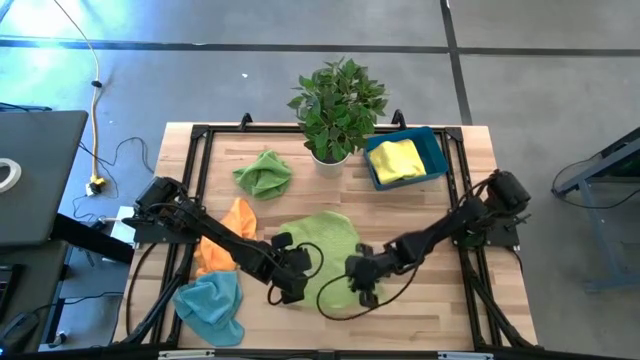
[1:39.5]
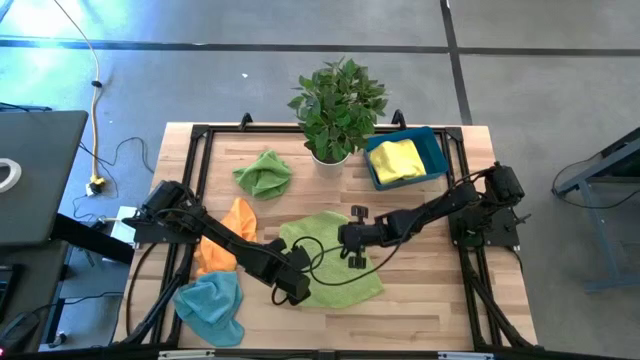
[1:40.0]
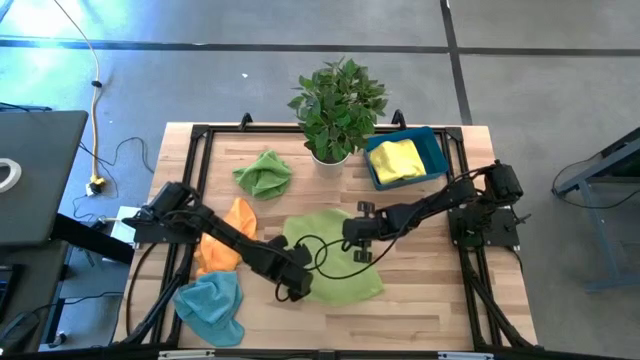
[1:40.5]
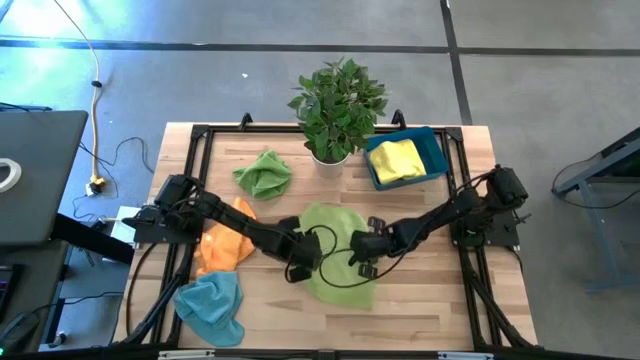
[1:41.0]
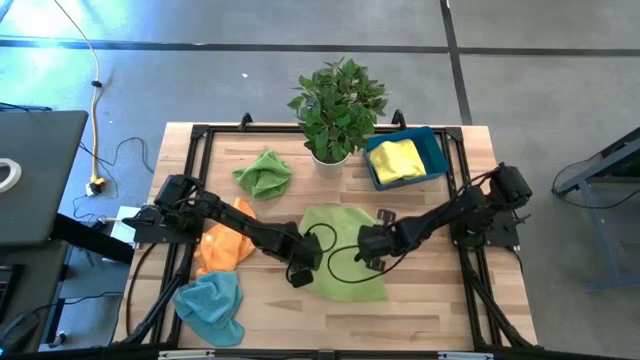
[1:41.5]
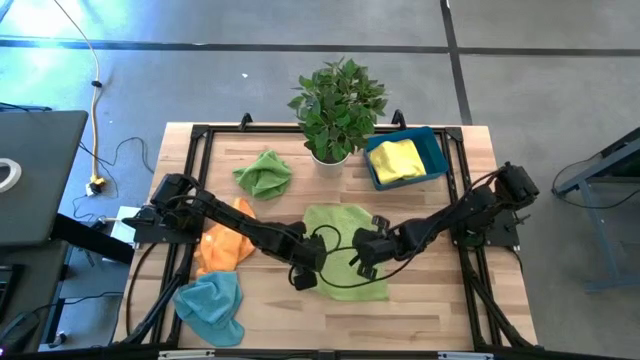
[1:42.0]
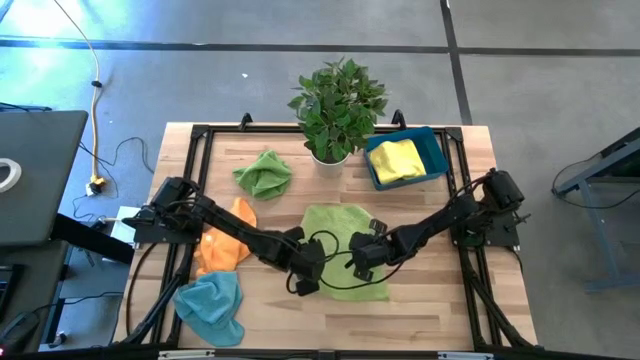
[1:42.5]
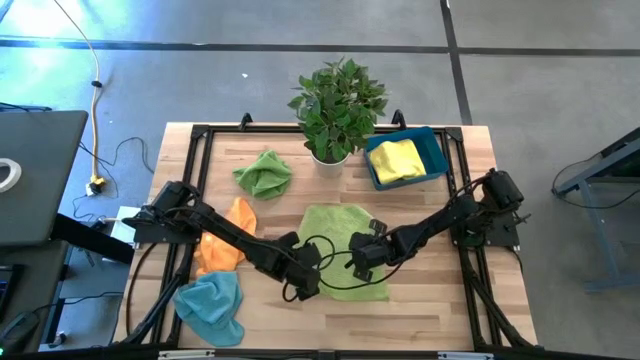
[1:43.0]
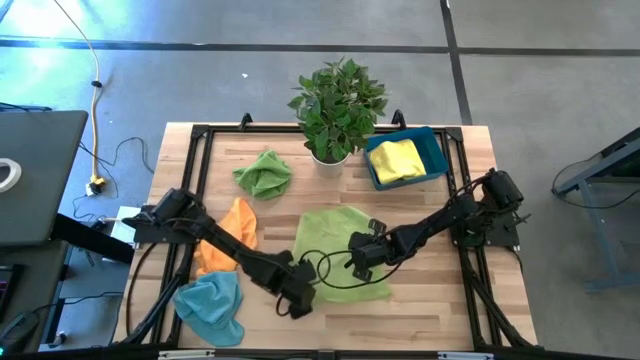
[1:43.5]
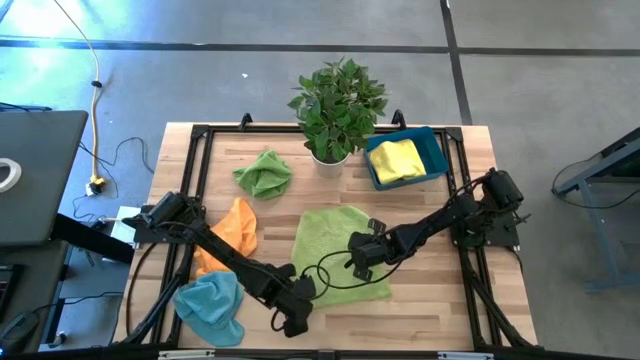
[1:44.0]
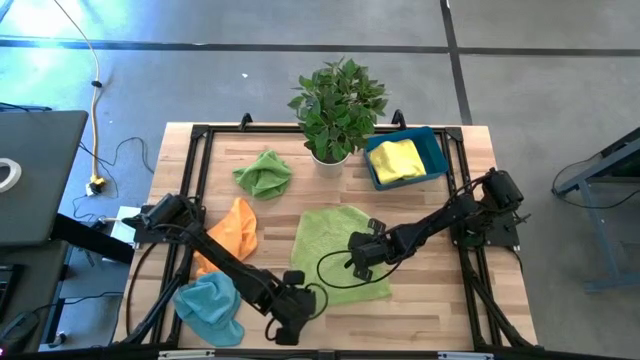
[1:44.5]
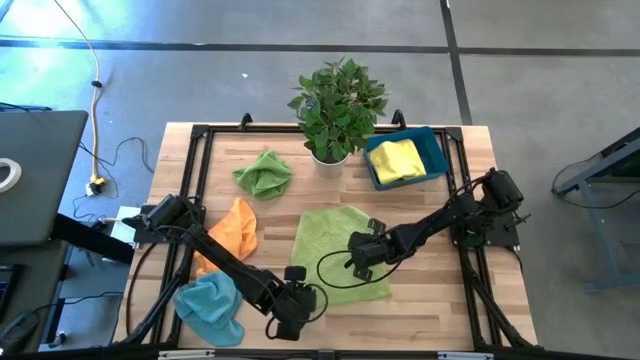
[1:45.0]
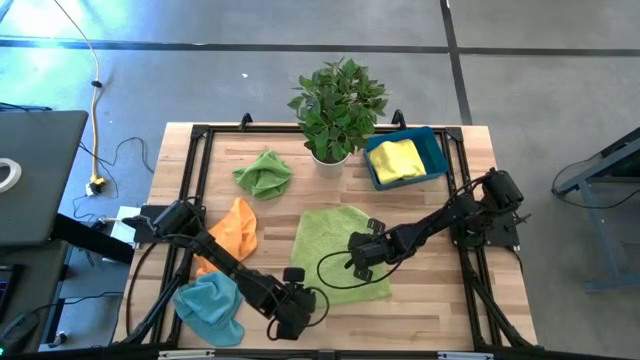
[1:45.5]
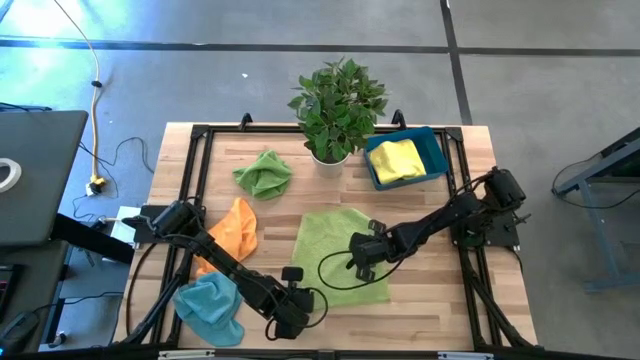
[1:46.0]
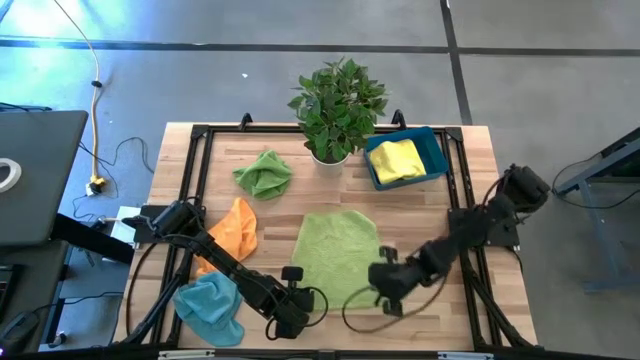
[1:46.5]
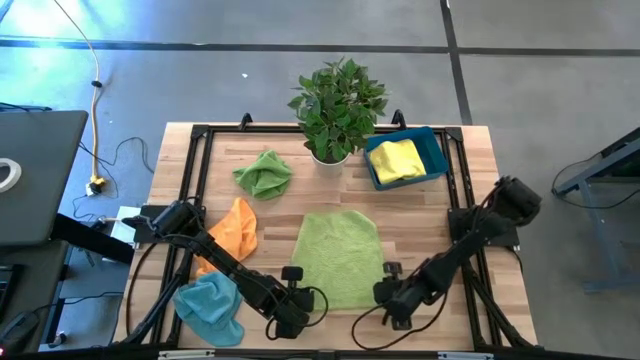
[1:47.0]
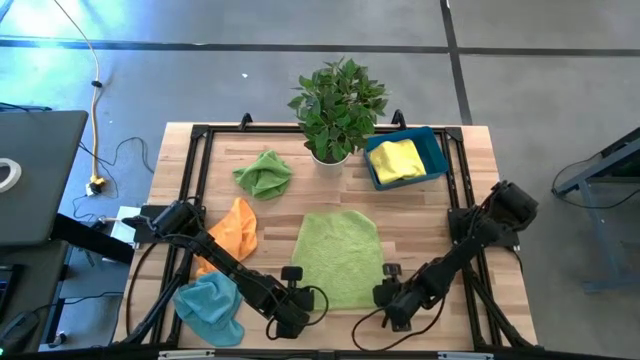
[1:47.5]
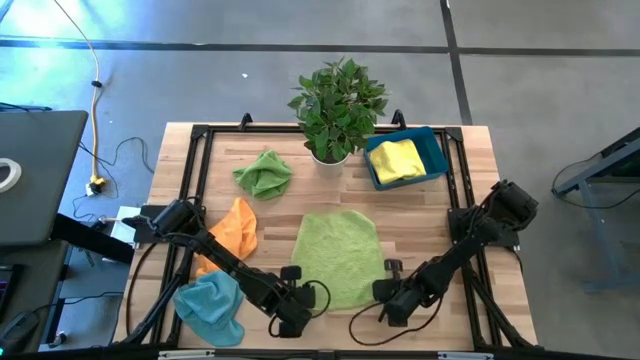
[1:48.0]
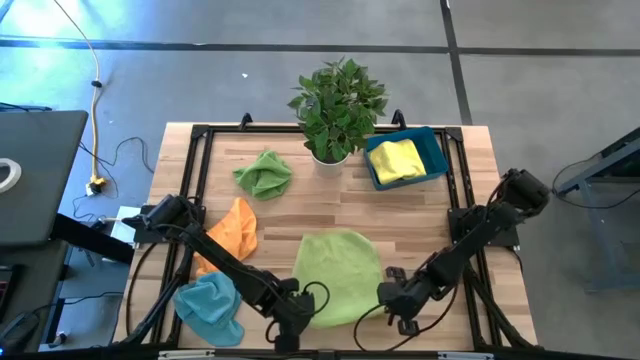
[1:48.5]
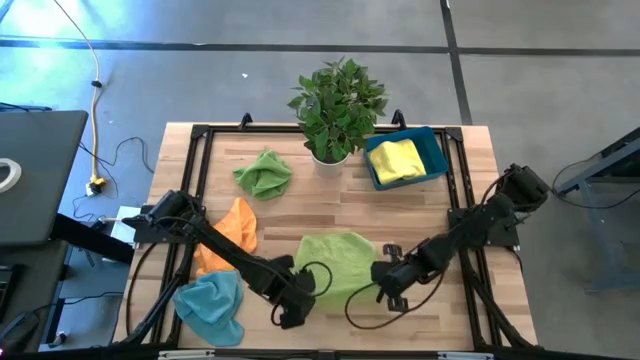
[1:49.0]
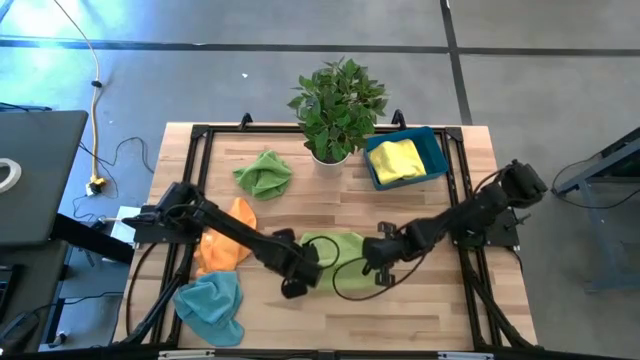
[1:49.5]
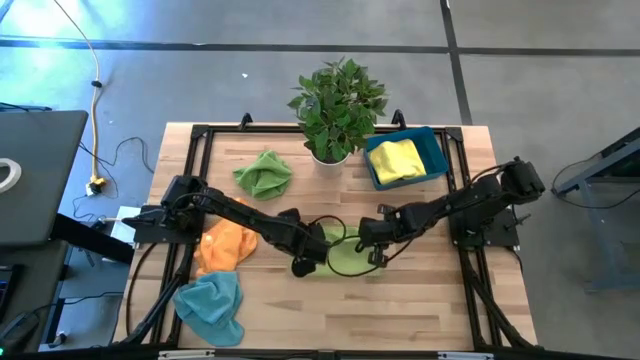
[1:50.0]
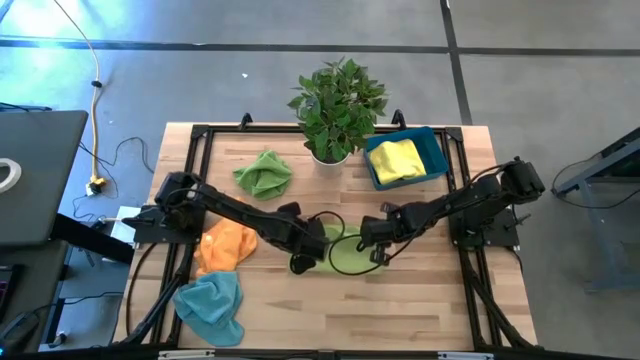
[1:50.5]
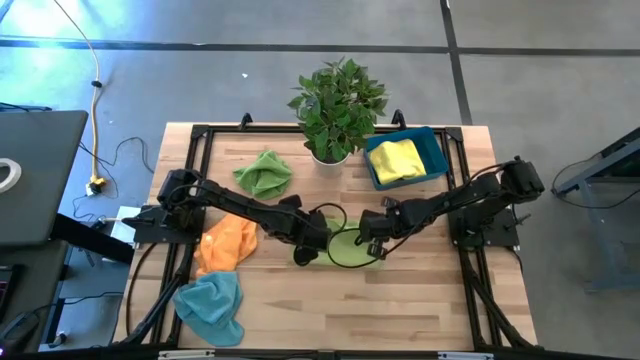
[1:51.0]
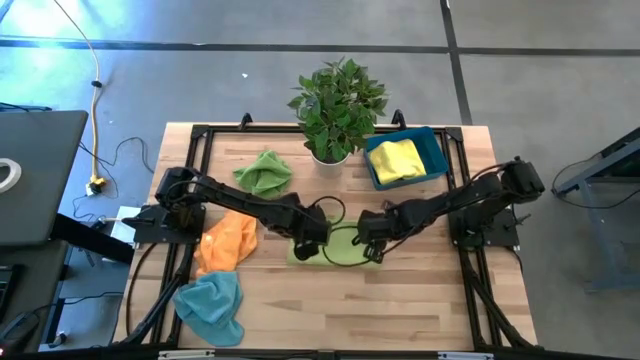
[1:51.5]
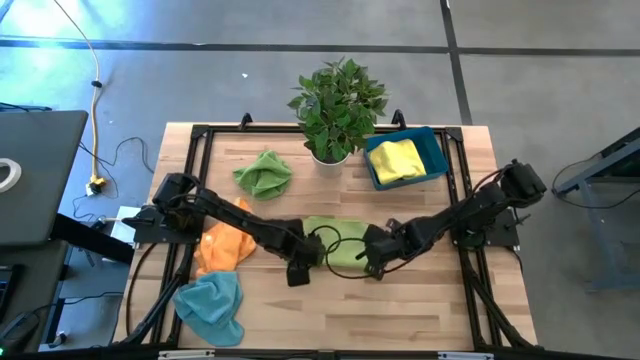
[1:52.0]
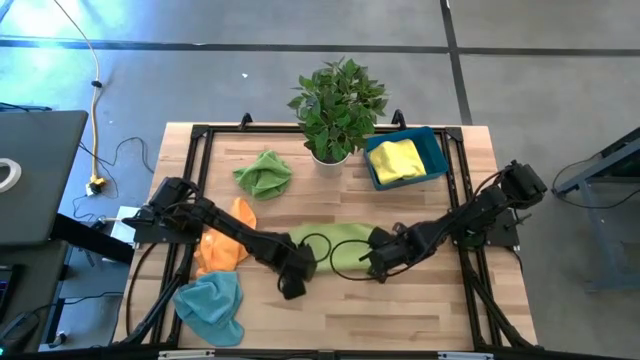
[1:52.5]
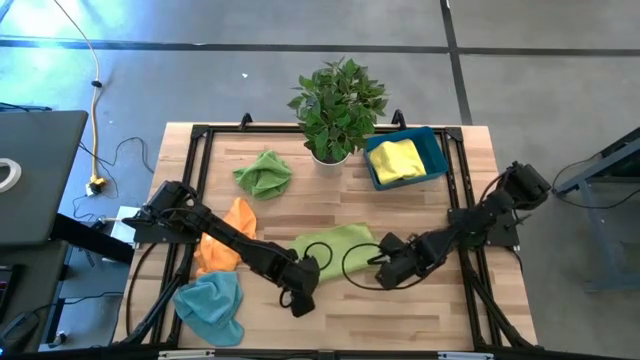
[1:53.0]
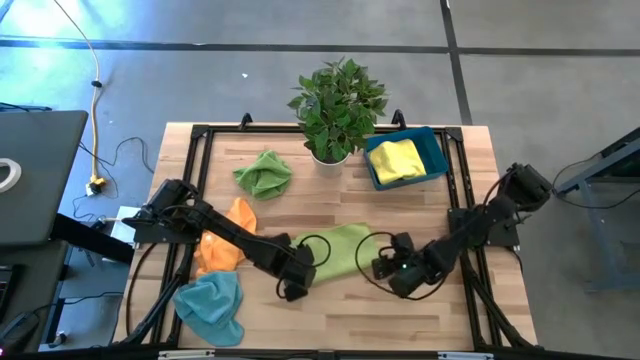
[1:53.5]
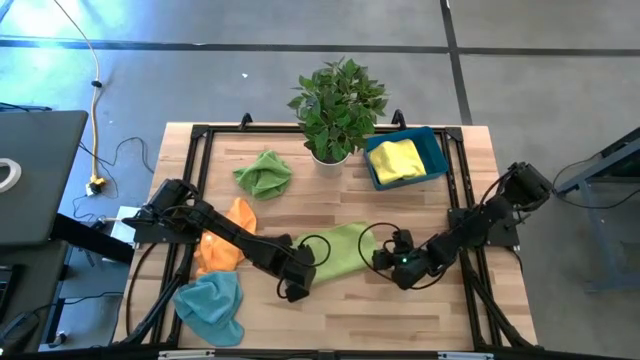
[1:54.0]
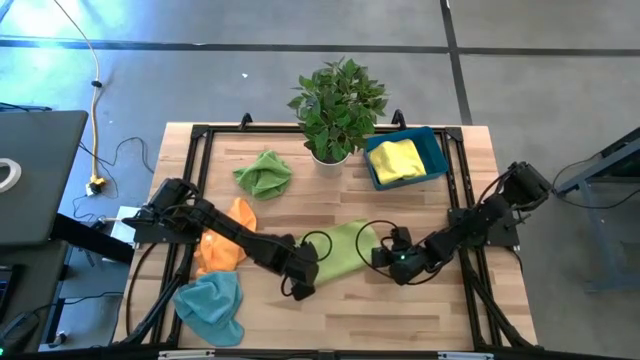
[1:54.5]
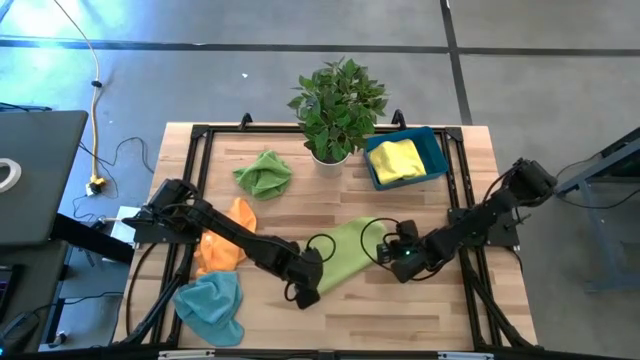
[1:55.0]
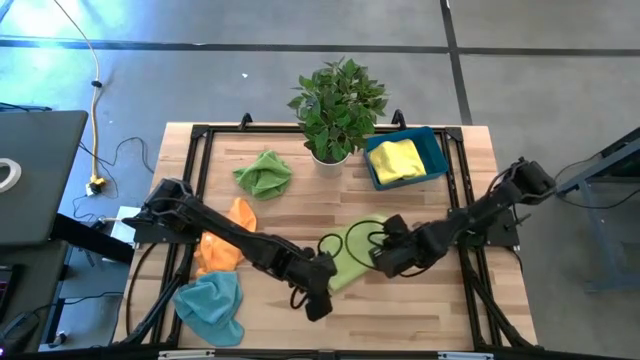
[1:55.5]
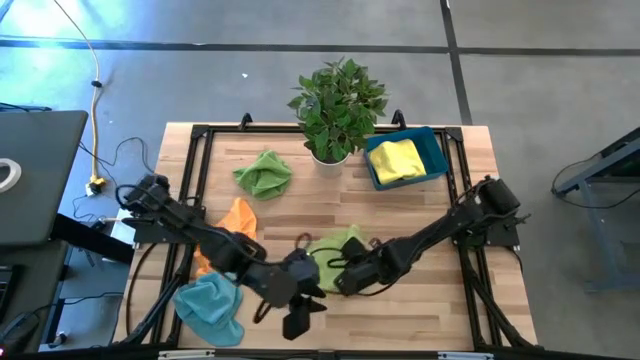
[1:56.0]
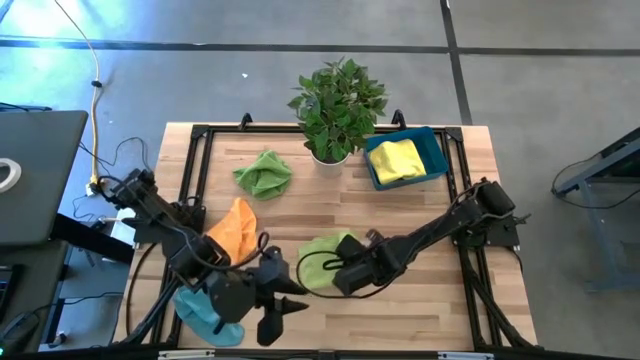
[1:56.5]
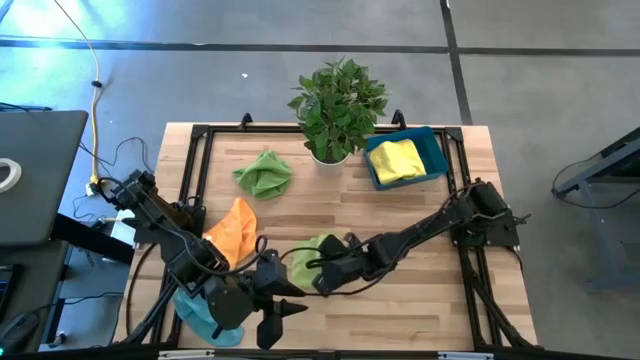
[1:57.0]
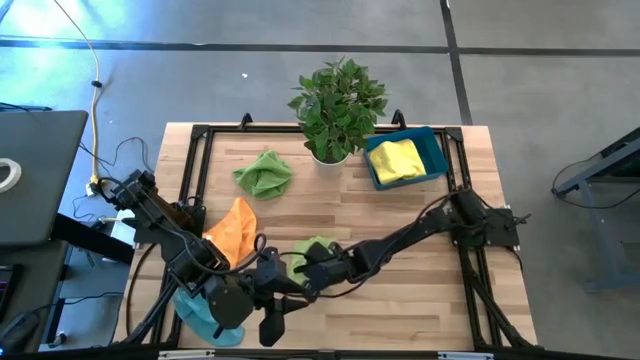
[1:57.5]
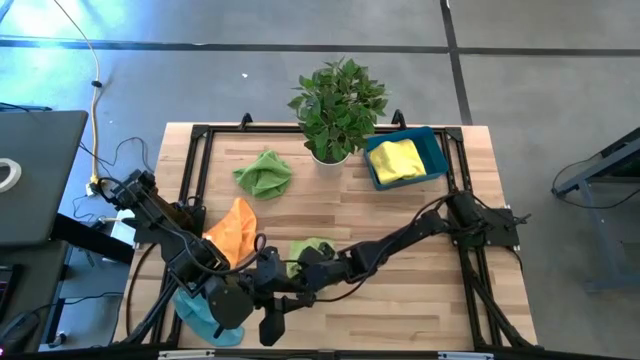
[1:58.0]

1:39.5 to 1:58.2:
Task: Sort microfiber towel by color & place in baskets
Fold the light green towel

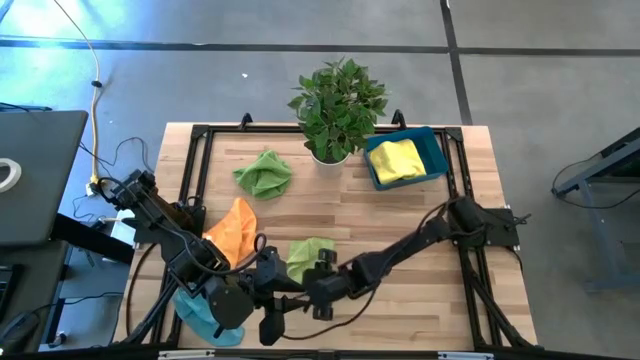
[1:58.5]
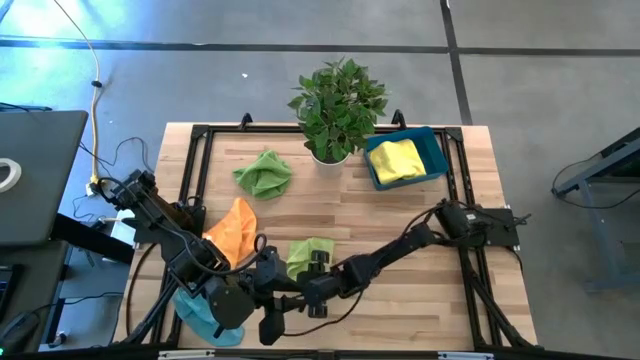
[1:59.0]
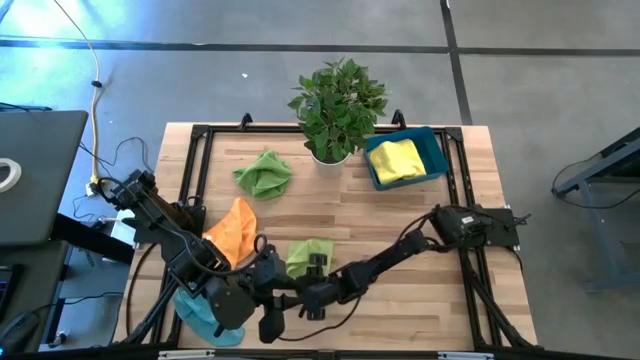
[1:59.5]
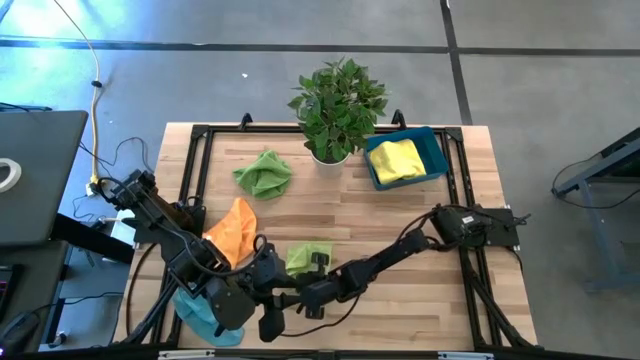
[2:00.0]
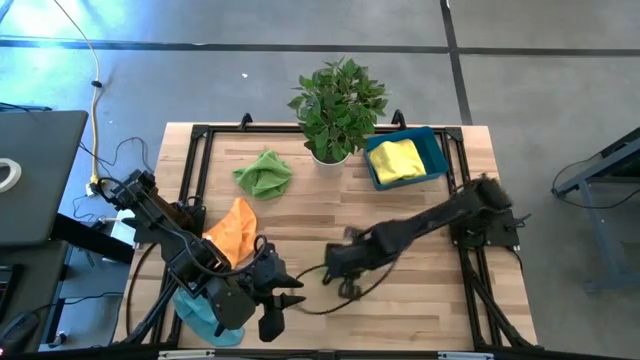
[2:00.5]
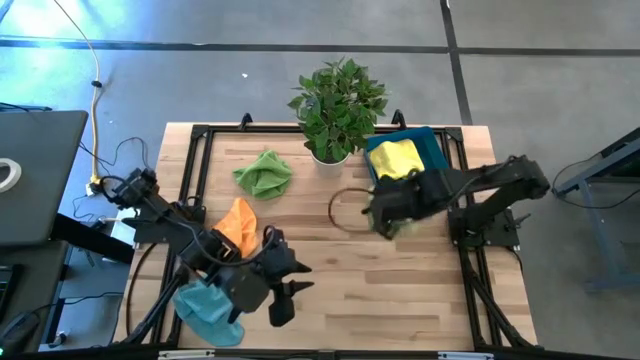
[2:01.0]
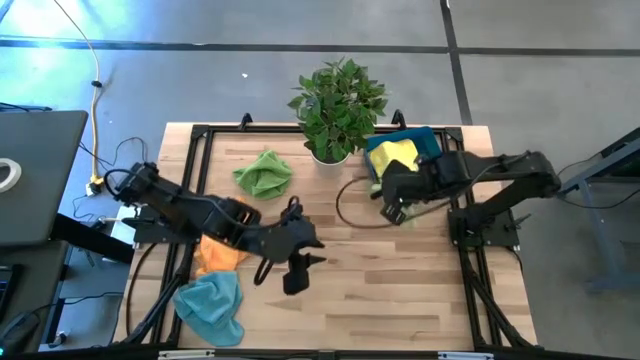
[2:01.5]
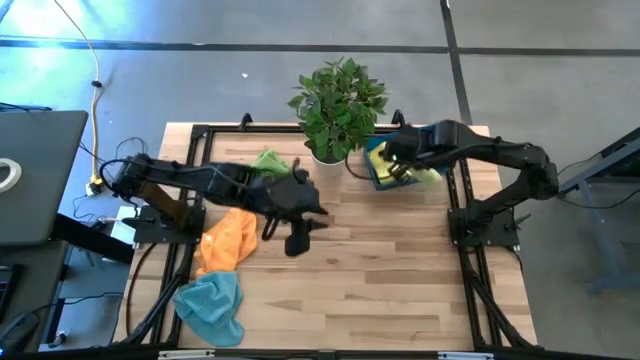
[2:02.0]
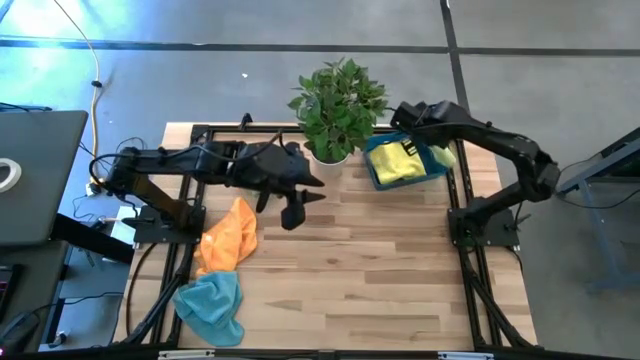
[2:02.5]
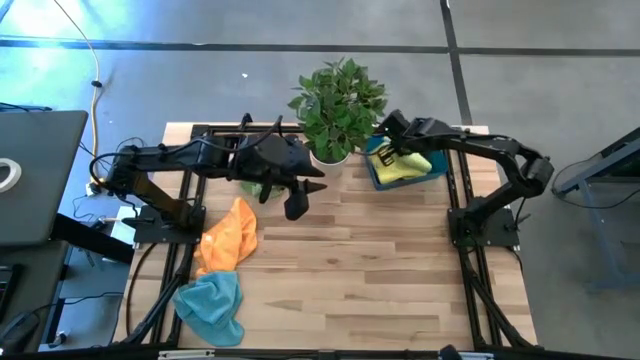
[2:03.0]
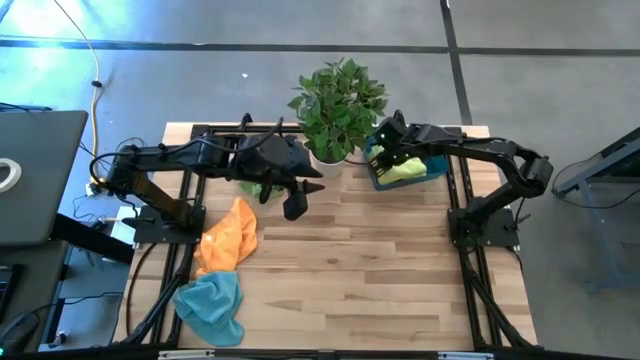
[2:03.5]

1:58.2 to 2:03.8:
Stack the light green towel on top of the yellow towel into the blue bin
